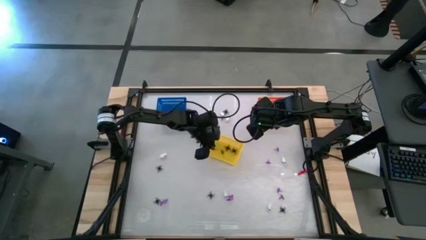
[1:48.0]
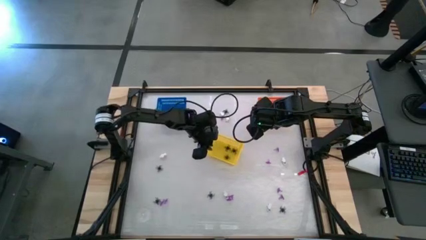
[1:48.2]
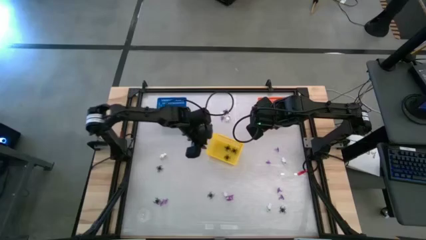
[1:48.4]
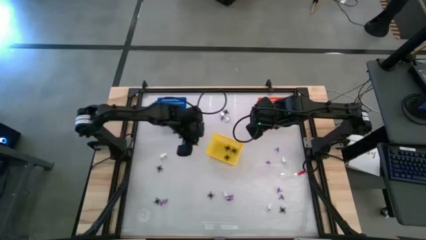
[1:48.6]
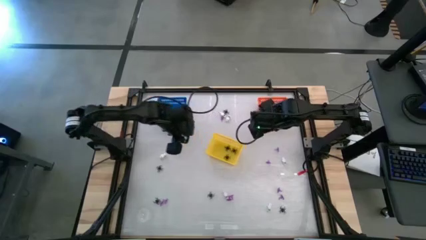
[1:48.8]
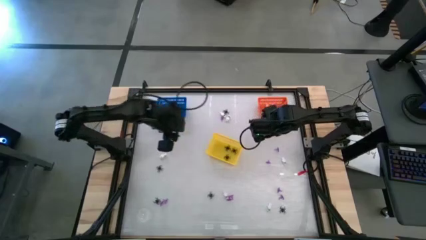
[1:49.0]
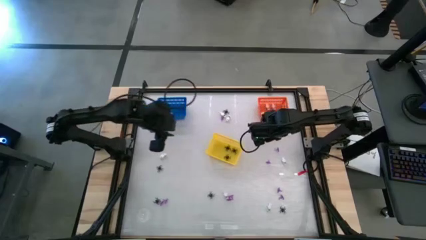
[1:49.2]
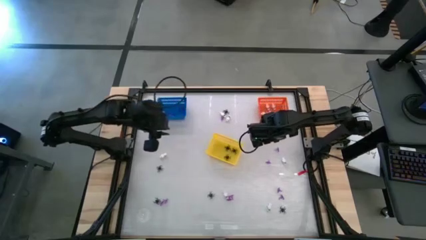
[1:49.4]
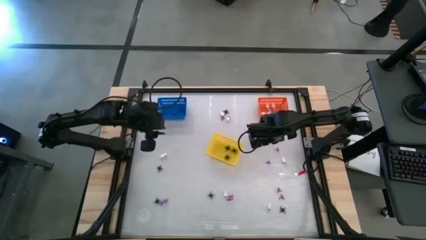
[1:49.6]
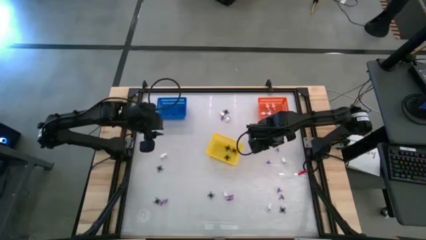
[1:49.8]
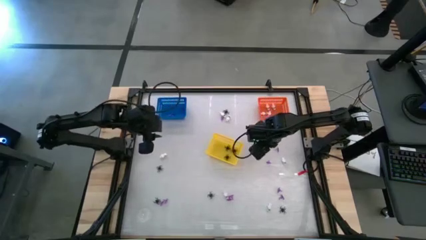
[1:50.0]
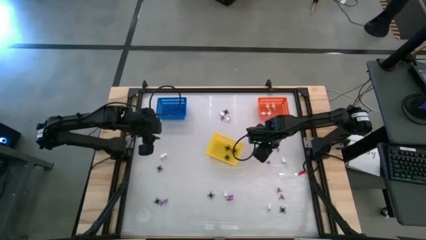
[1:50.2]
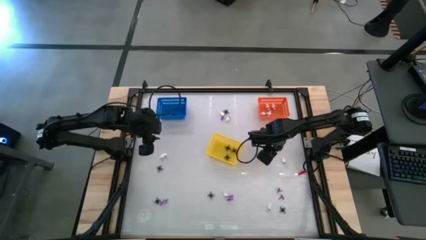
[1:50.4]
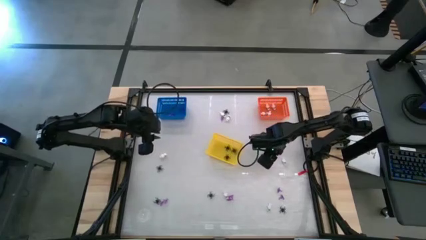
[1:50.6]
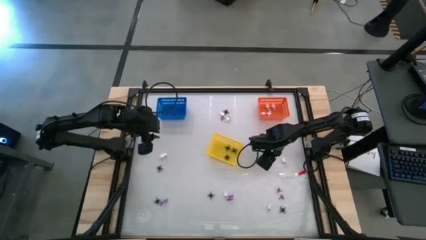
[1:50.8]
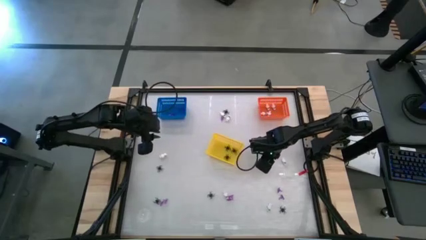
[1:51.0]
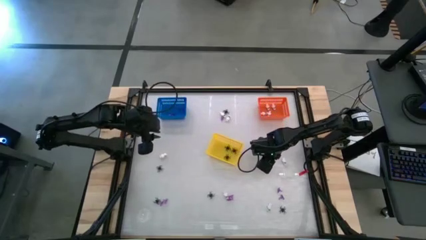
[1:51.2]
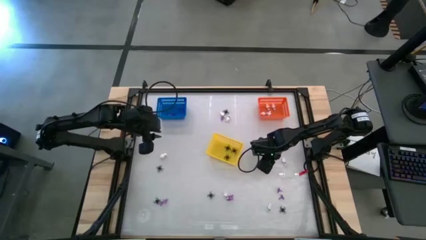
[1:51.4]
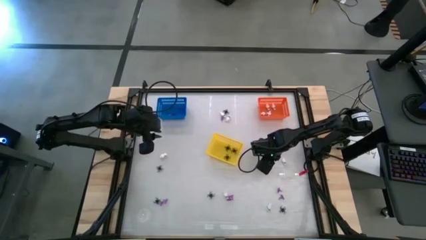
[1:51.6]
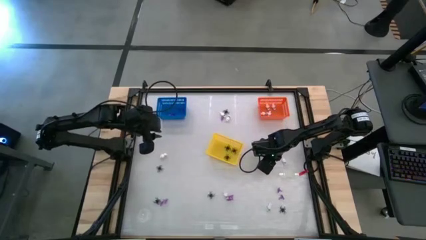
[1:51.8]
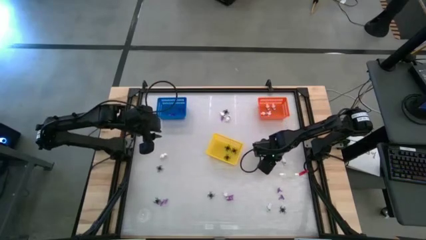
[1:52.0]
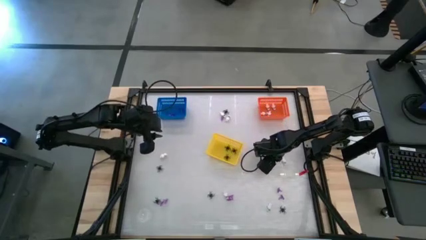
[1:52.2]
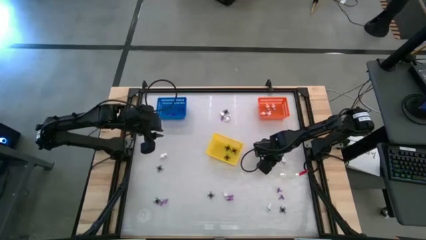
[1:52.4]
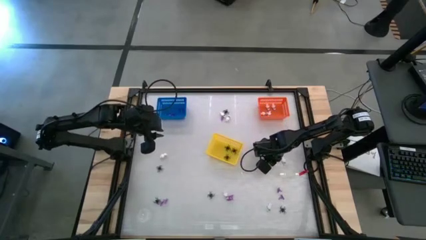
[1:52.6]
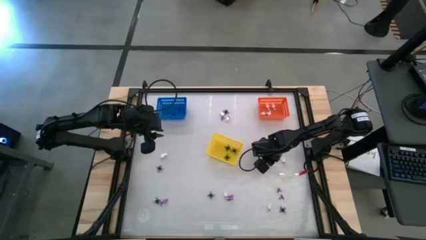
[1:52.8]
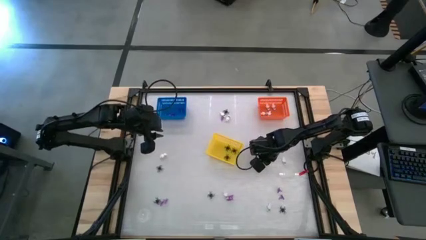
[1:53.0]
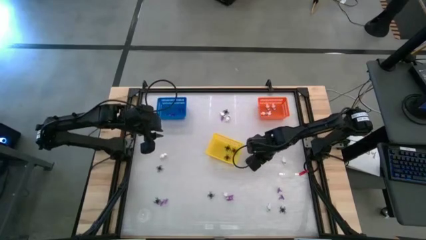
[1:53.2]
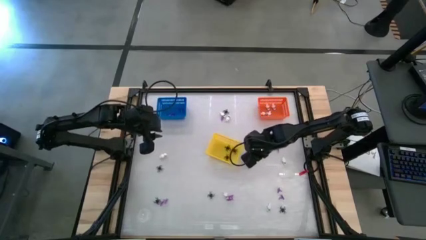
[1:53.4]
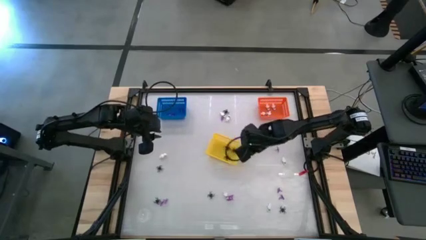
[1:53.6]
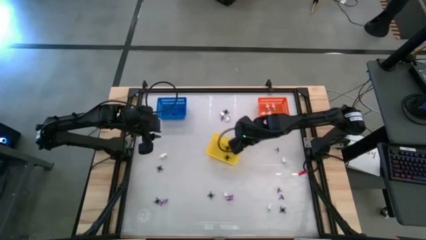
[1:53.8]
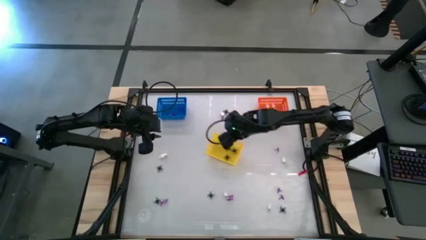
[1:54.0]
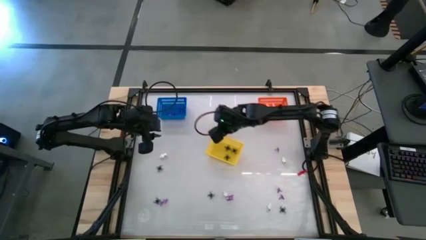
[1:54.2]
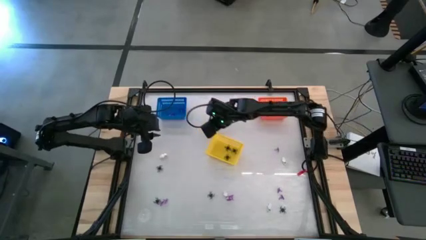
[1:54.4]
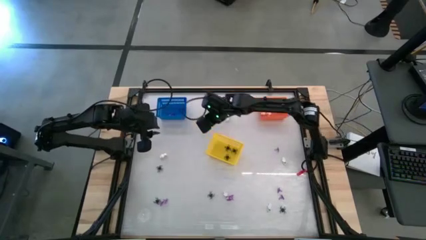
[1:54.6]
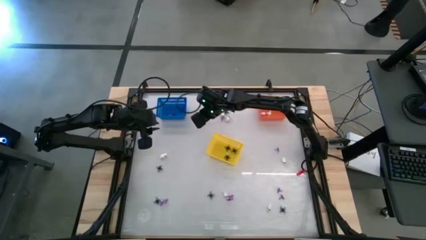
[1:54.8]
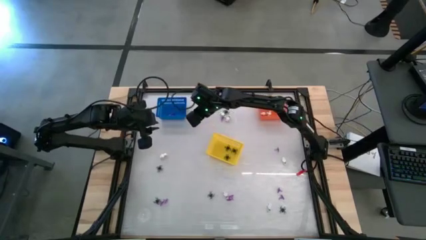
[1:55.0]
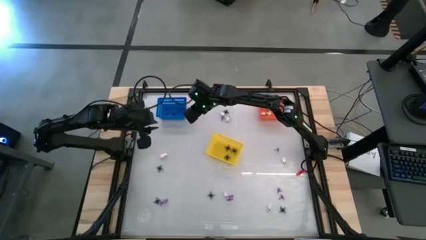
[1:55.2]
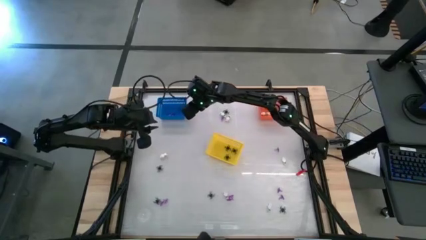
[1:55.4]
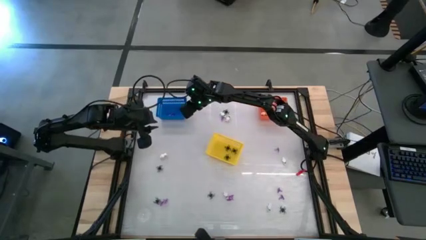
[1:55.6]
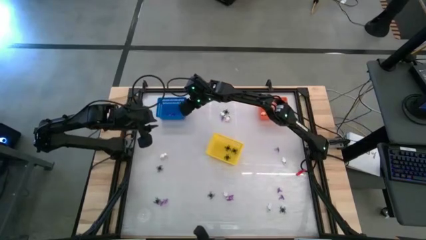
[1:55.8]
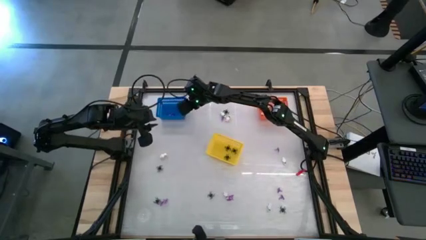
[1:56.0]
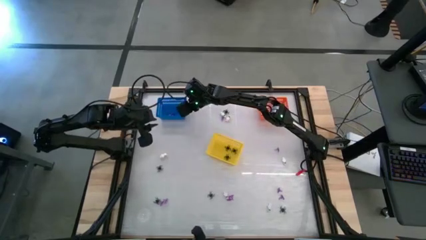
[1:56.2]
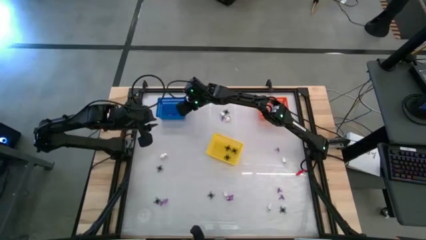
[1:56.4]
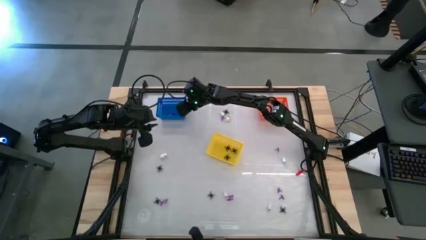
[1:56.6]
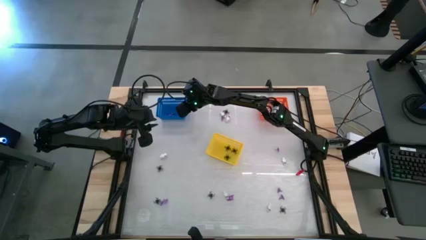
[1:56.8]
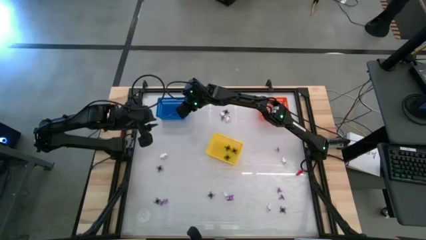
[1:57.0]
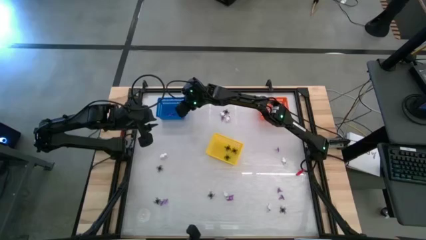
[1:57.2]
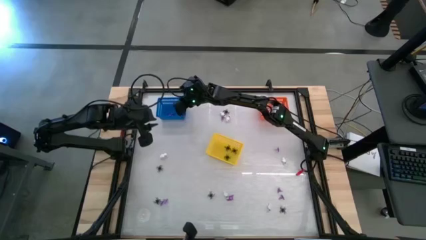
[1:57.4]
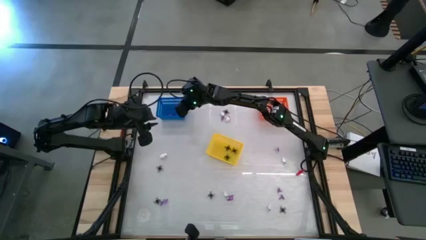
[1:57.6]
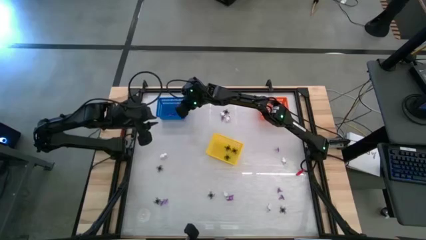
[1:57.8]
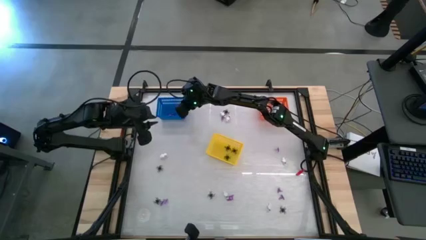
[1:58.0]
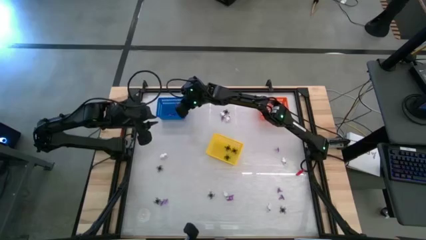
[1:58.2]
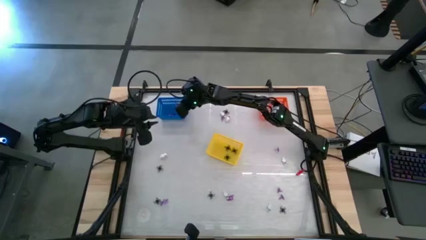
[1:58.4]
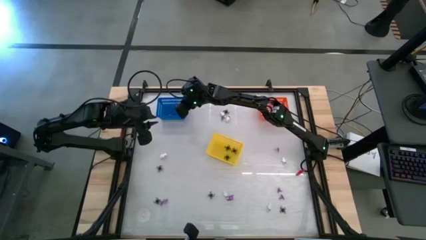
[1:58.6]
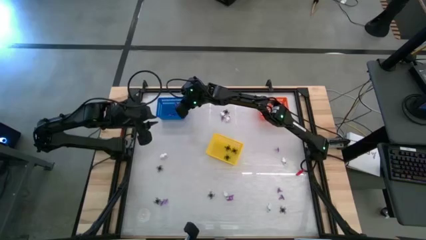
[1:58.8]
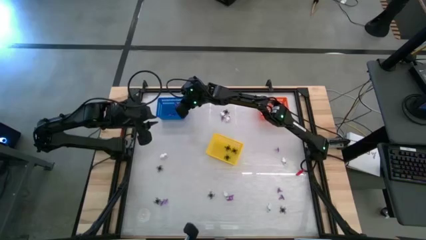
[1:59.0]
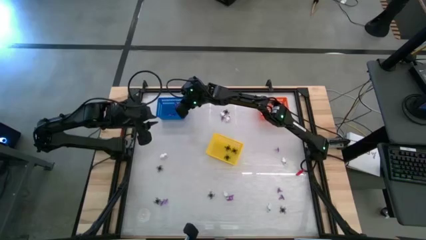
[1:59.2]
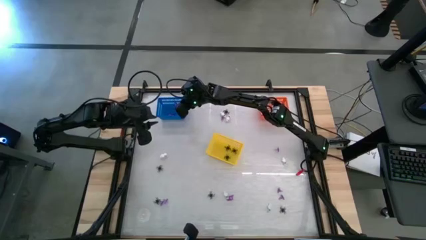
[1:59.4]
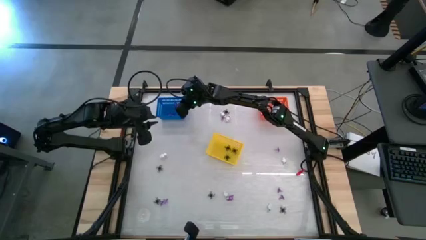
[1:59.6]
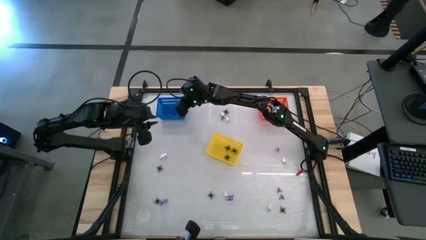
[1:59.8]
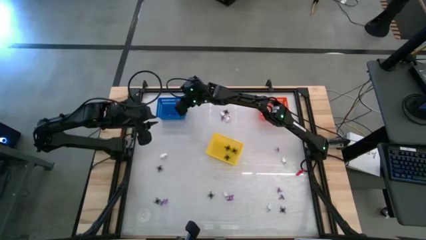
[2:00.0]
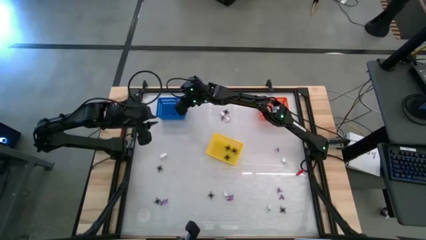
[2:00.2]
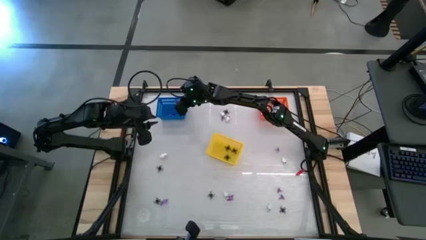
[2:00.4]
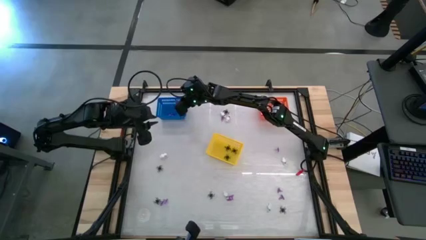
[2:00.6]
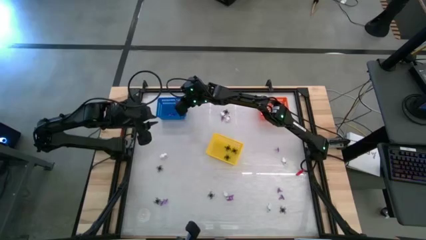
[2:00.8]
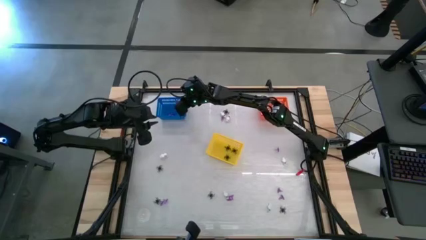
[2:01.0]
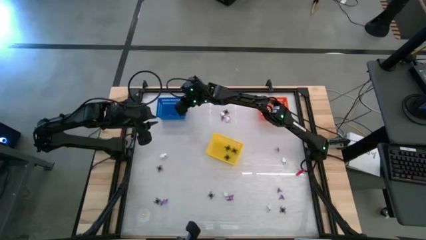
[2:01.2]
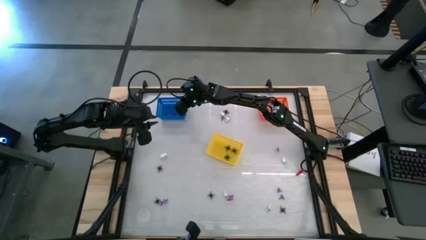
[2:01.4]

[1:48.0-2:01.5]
Task: Sort Halloween decoration
Put the purple witch hat toy into the blue bin
